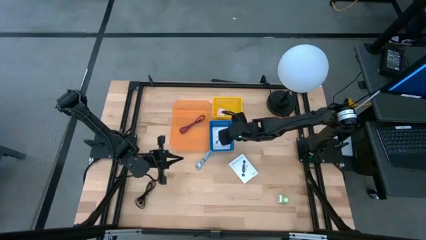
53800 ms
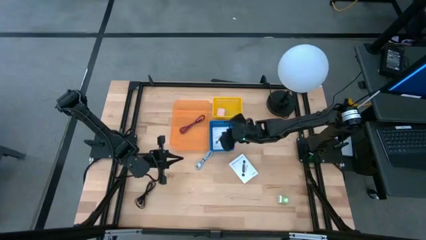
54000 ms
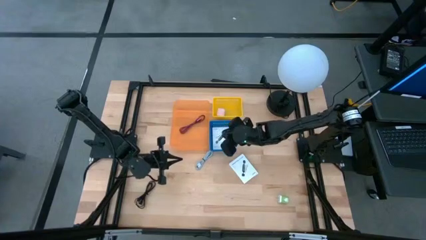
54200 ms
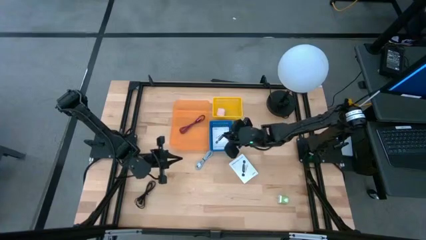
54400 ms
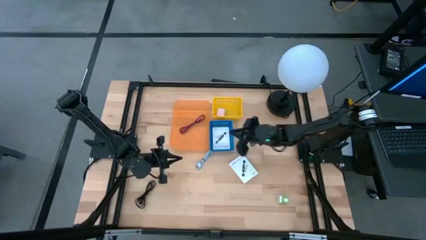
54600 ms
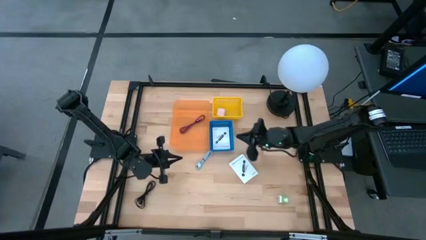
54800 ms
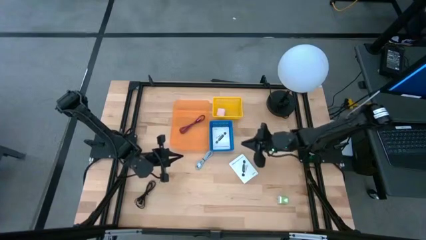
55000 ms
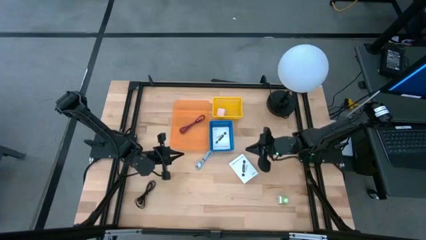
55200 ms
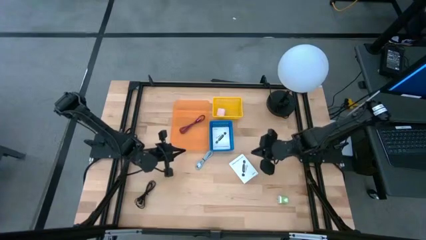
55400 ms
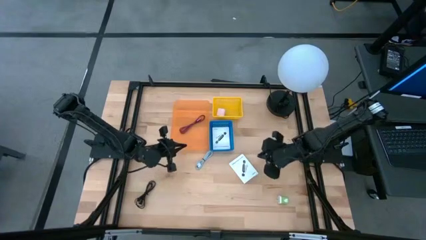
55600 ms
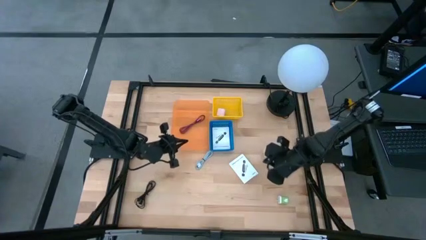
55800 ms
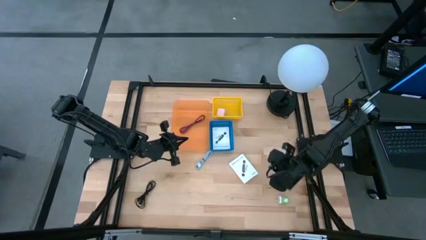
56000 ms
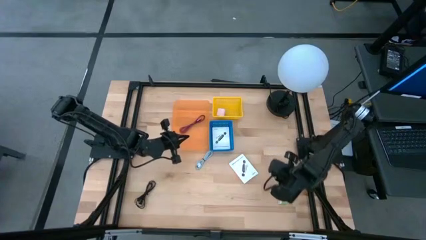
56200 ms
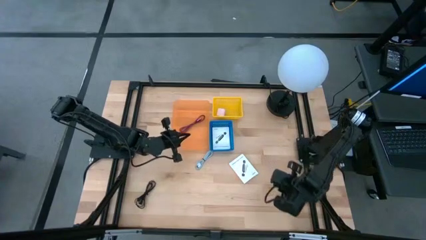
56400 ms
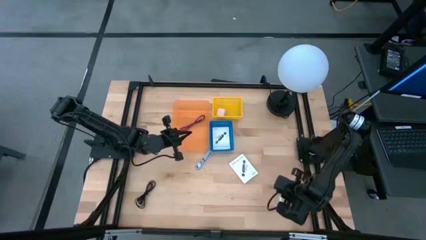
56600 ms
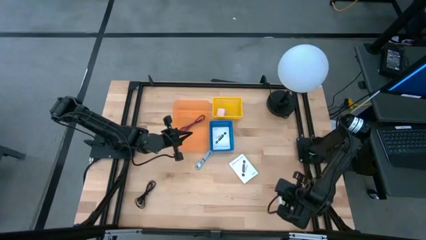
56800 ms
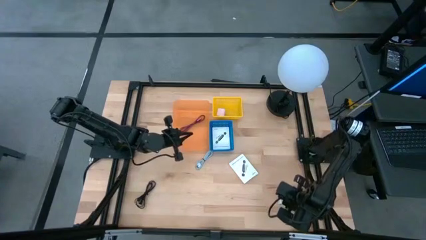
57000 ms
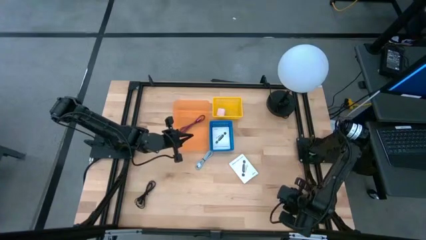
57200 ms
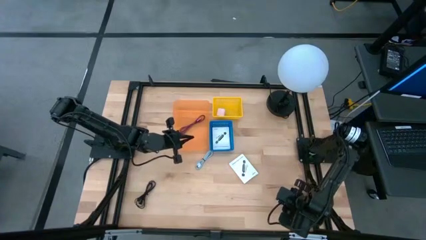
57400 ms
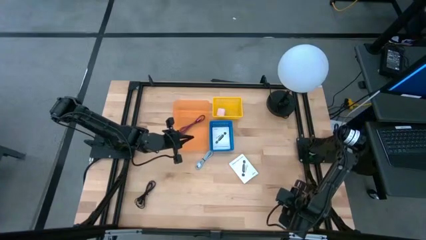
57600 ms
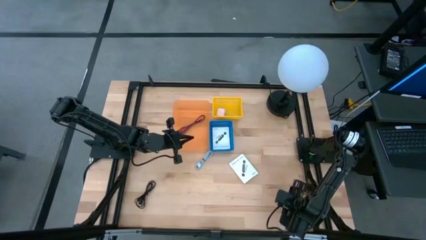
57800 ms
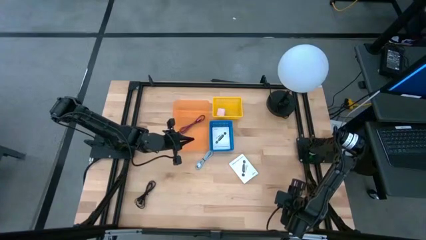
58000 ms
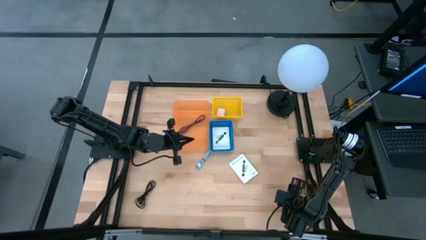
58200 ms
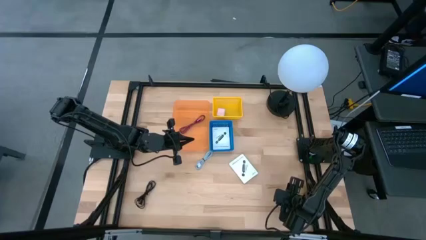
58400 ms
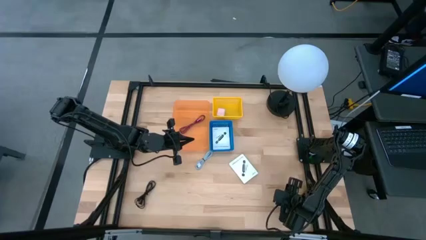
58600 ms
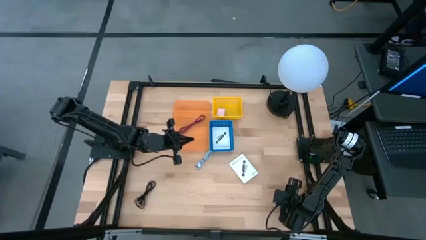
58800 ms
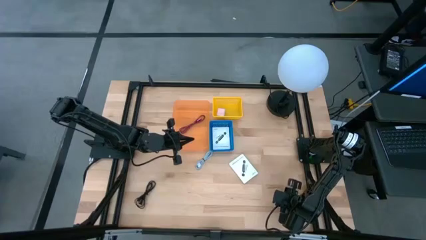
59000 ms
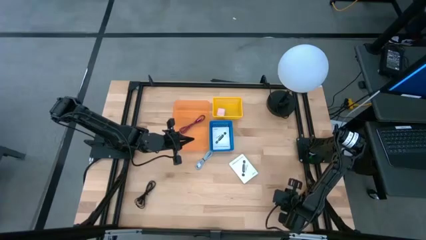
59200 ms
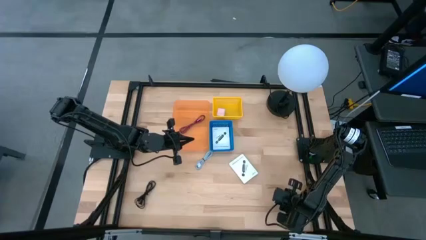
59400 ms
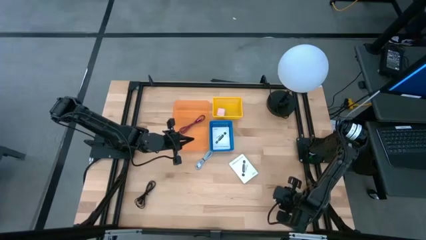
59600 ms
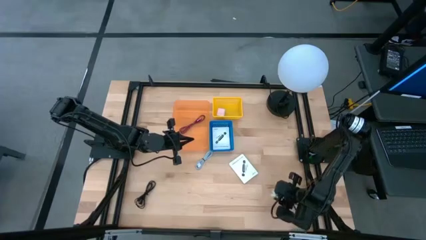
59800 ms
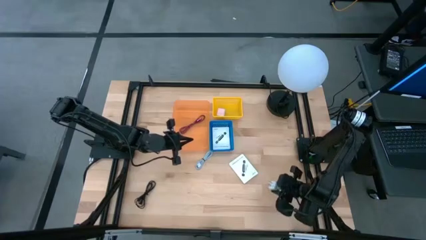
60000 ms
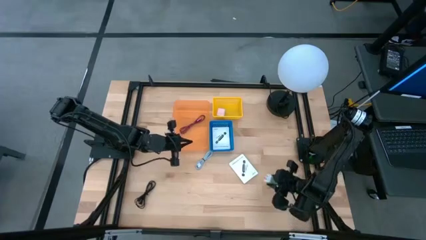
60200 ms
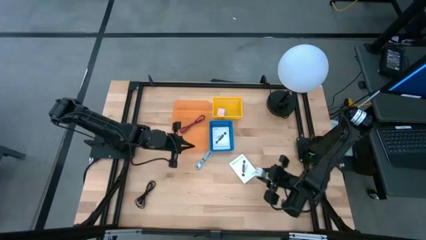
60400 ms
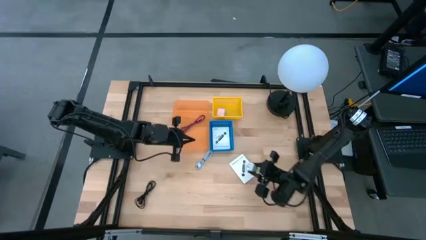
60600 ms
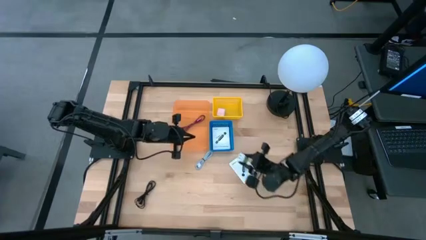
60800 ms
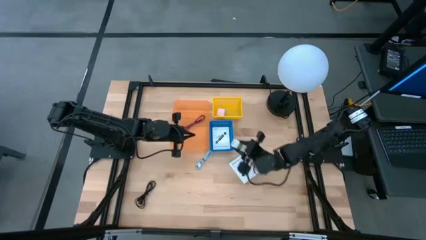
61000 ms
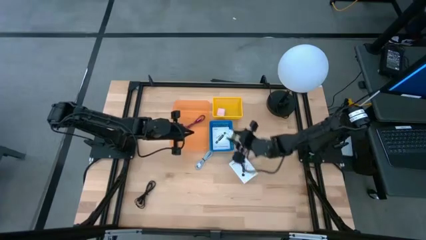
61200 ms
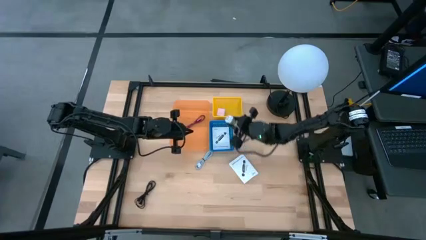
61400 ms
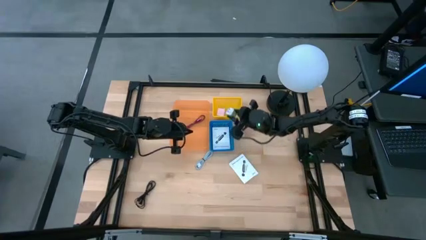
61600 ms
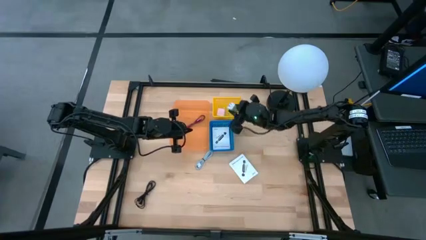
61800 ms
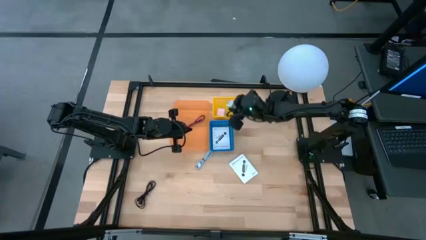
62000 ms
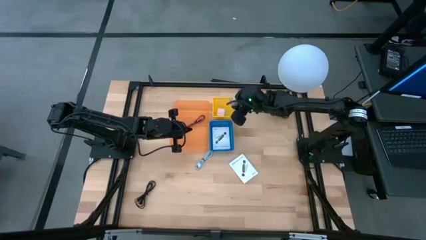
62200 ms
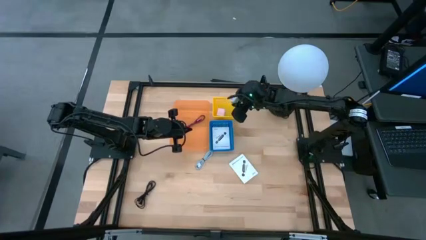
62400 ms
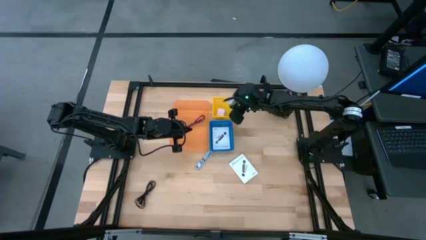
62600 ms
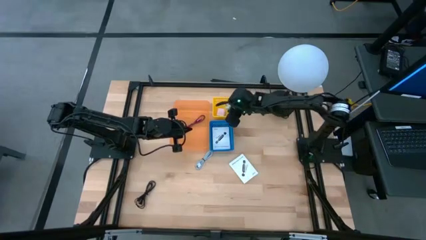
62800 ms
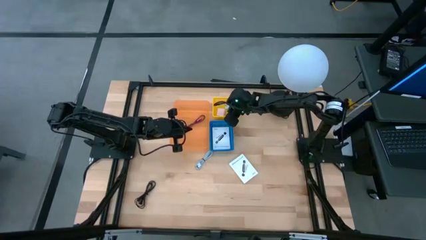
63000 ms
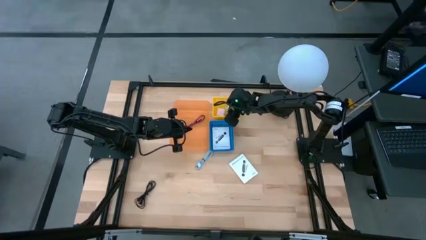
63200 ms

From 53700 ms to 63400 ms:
Task: Pick and place items into bin
Put the green charger adapter into the yellow bin

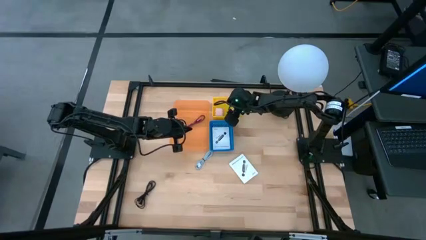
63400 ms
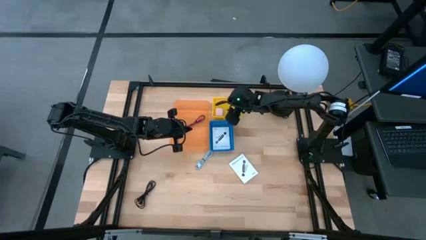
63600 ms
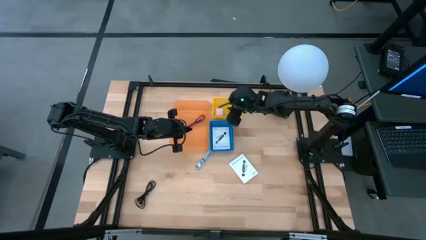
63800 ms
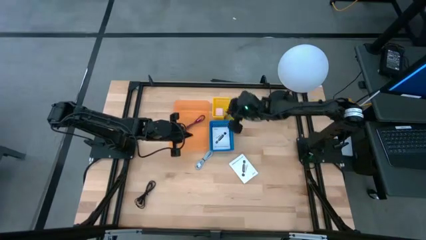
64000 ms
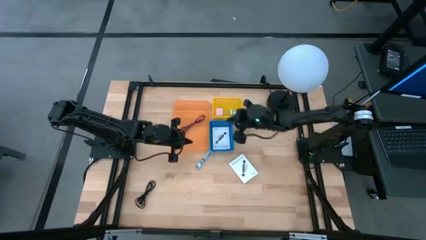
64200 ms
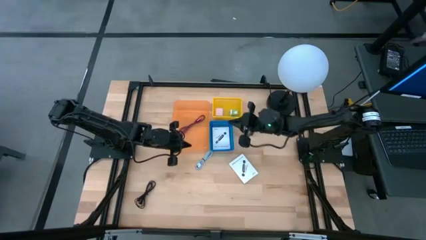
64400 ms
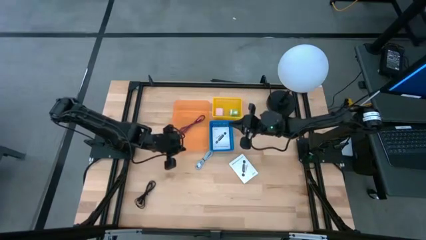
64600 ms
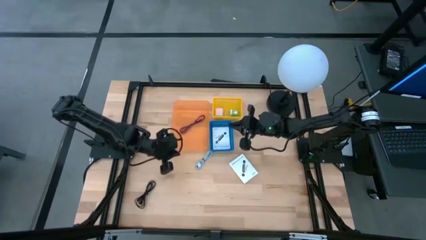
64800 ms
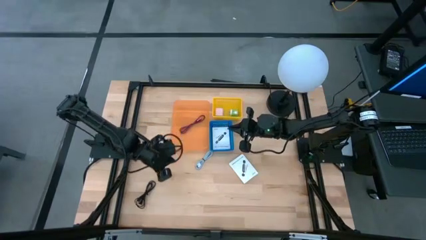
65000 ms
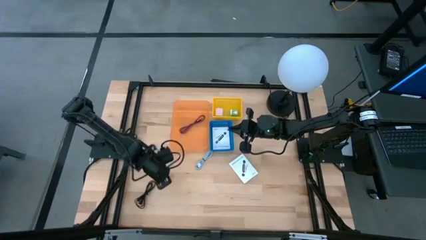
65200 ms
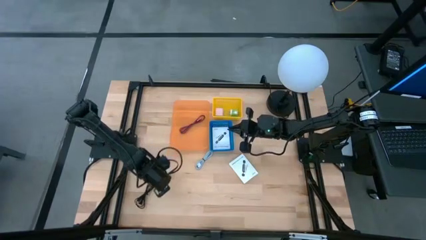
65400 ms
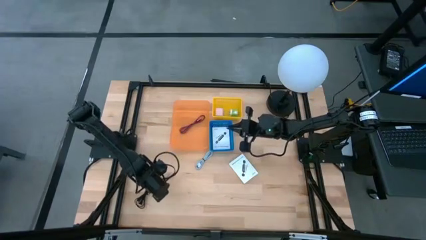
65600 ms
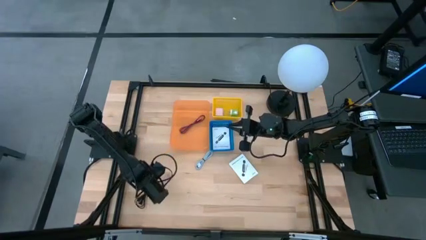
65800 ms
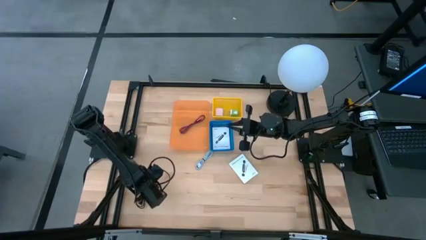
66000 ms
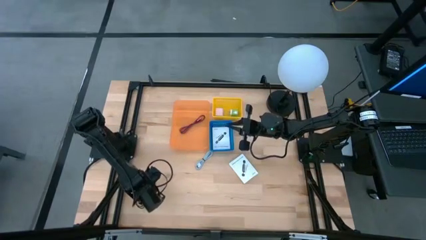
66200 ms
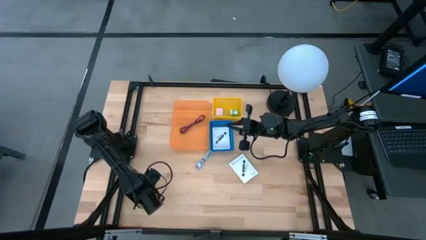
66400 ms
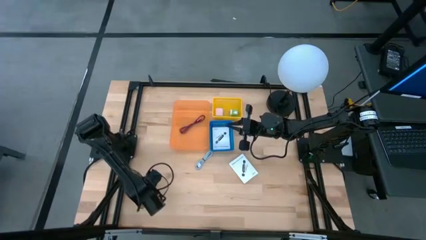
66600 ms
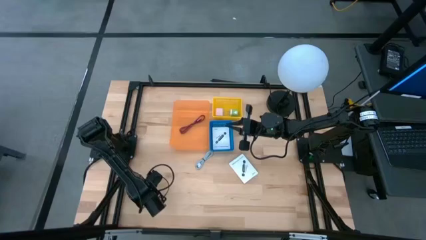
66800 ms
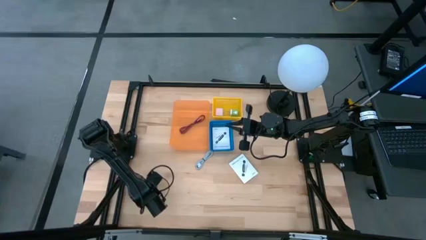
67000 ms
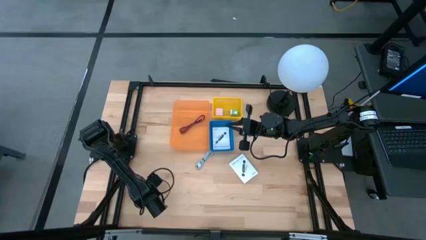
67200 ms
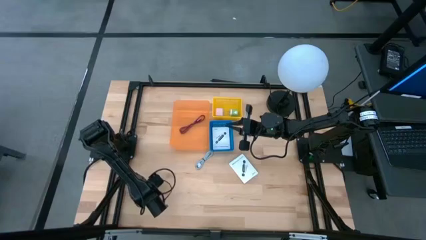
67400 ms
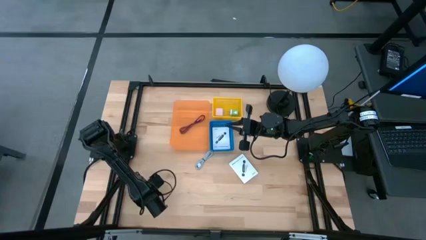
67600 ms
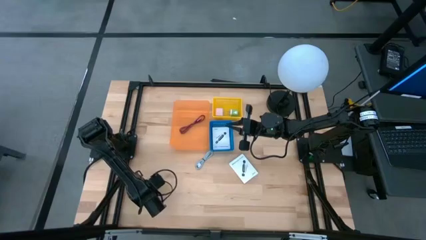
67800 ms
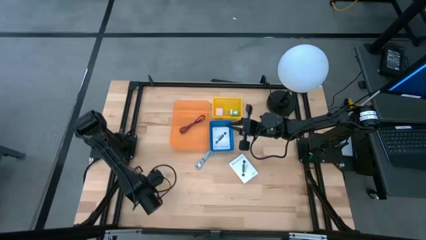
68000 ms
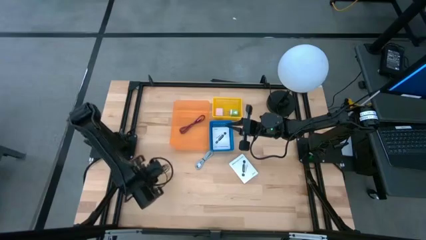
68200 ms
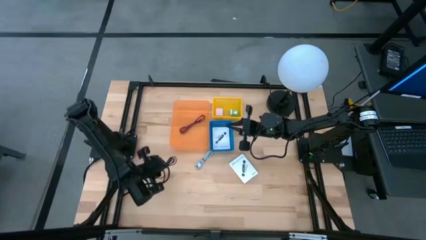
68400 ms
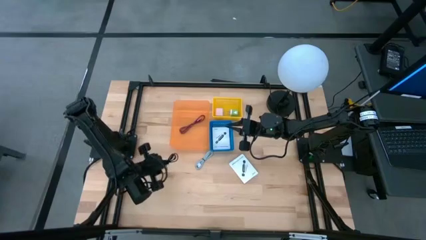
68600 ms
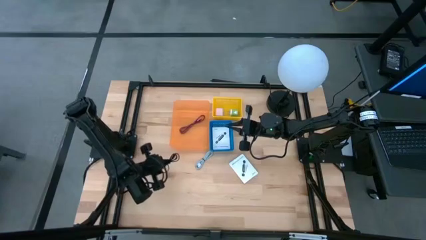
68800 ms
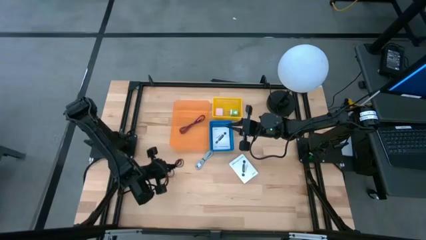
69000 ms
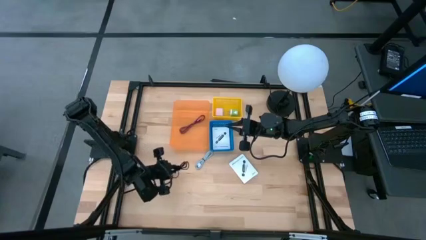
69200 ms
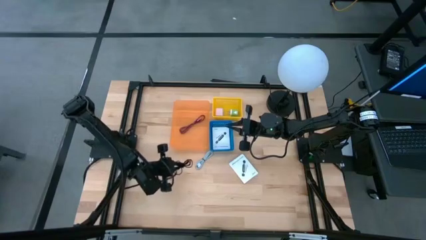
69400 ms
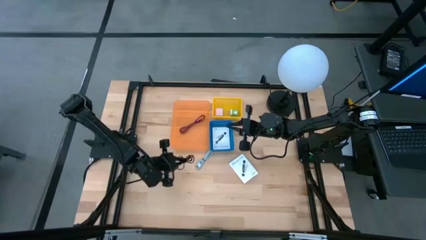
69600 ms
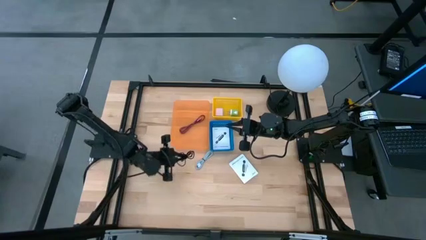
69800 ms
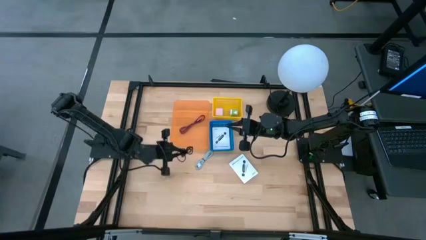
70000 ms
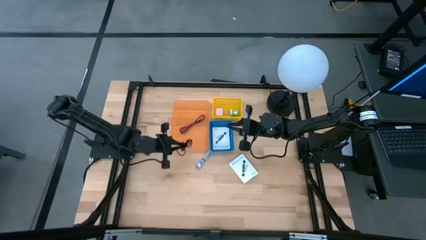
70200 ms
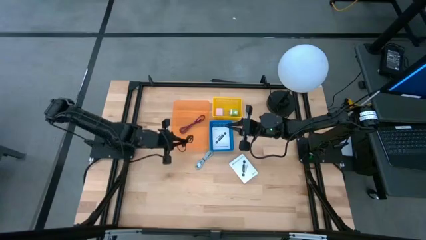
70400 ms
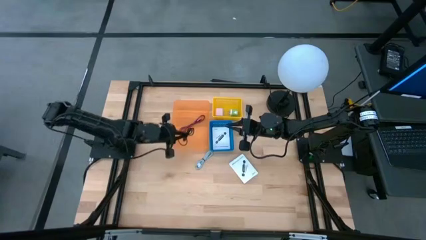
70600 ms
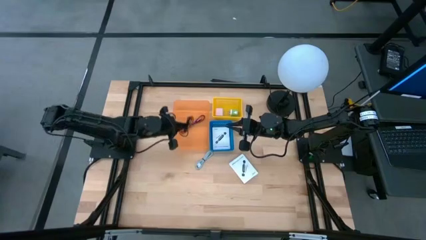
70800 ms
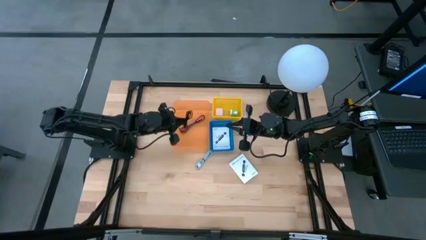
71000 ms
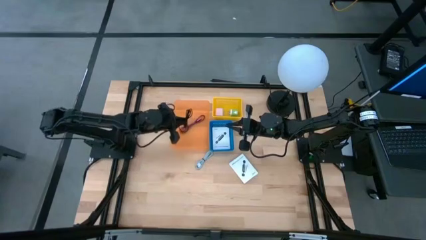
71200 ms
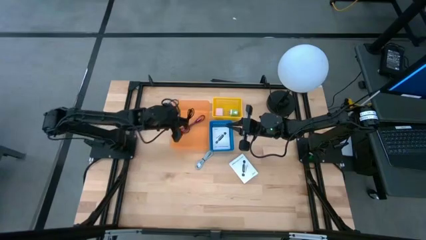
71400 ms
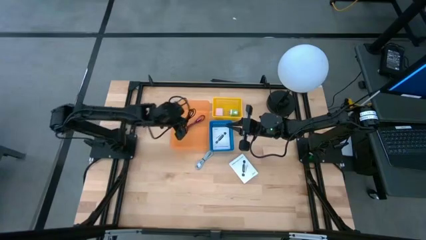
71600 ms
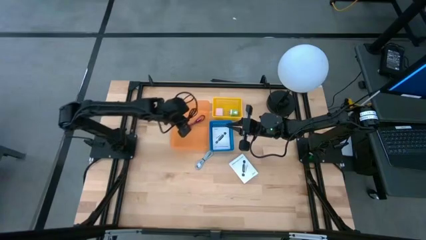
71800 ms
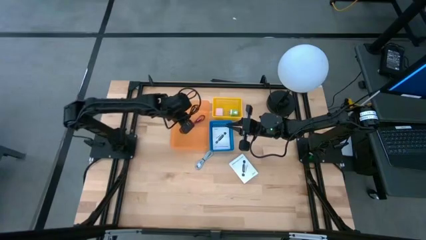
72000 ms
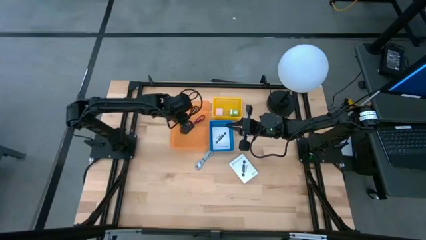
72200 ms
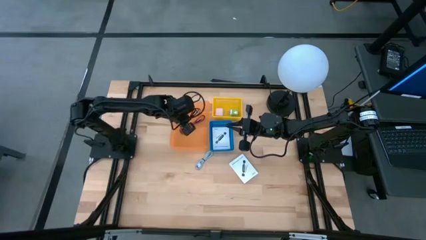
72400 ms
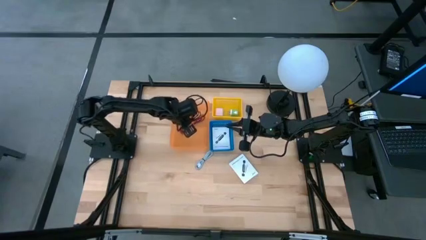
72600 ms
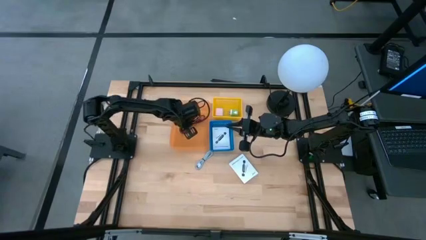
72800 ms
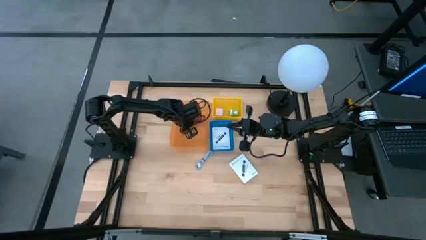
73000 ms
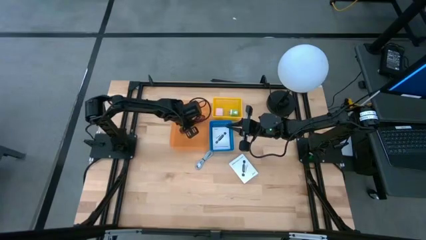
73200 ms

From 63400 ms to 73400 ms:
Put the black charger cable into the orange bin
